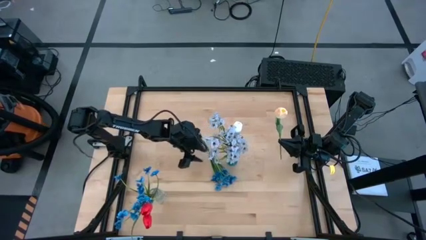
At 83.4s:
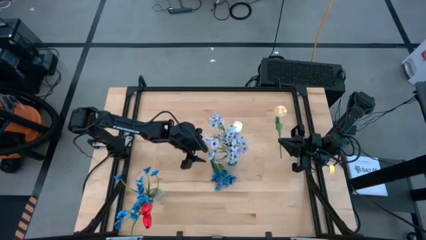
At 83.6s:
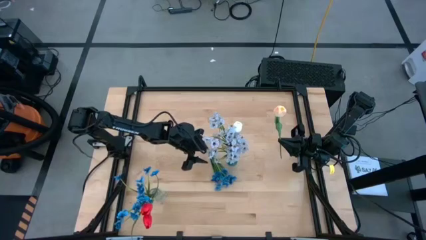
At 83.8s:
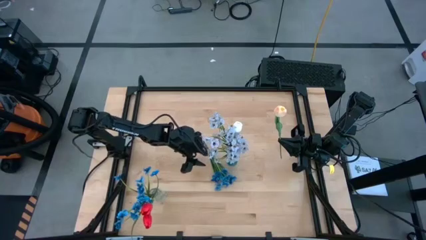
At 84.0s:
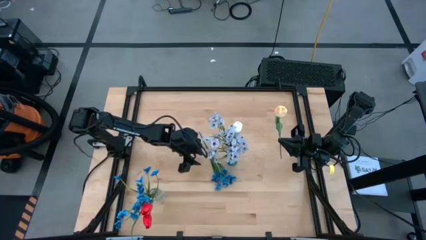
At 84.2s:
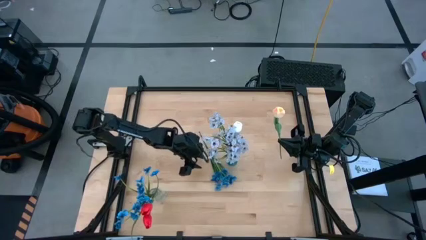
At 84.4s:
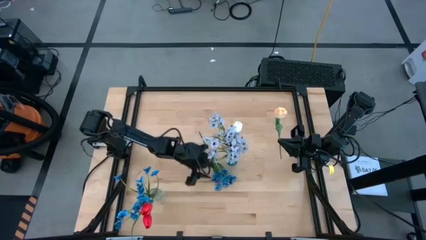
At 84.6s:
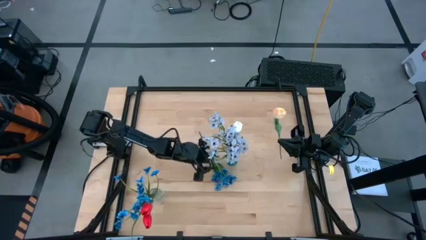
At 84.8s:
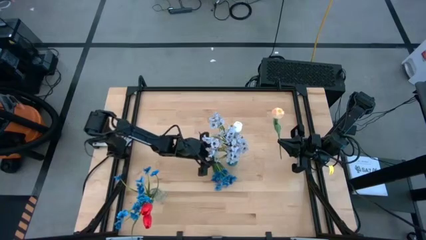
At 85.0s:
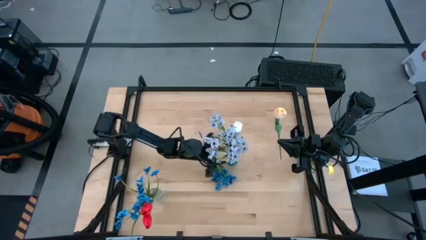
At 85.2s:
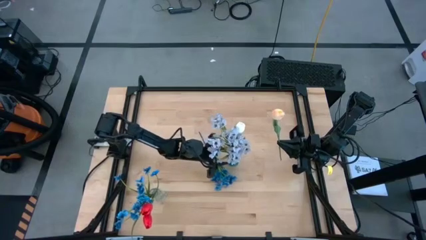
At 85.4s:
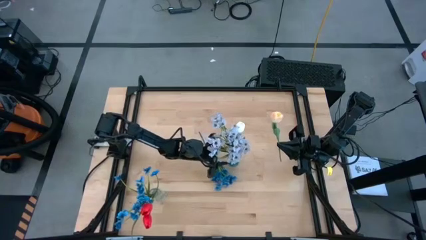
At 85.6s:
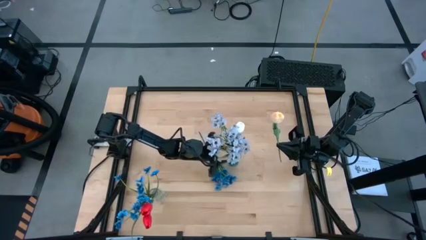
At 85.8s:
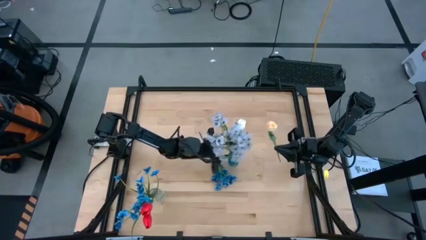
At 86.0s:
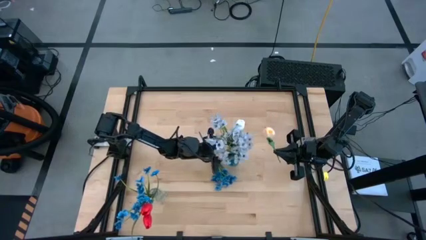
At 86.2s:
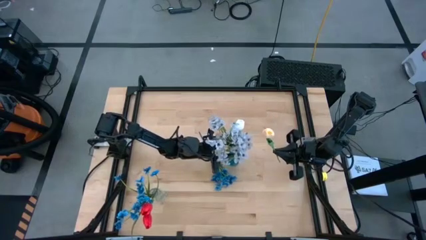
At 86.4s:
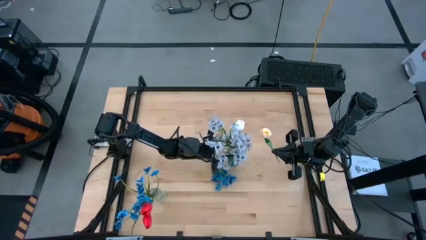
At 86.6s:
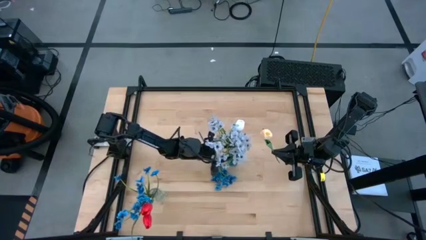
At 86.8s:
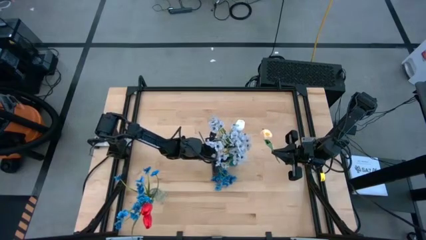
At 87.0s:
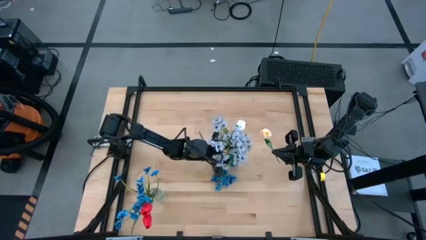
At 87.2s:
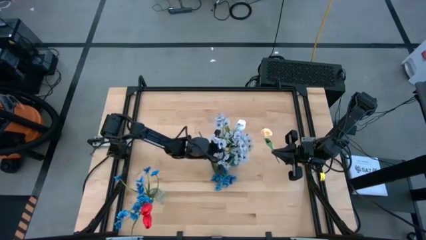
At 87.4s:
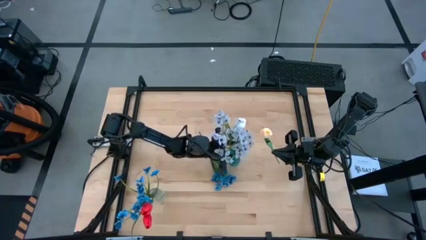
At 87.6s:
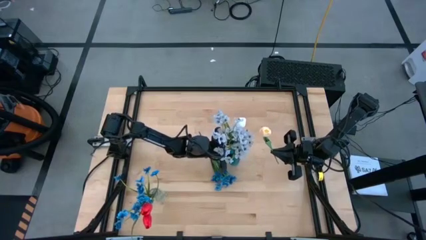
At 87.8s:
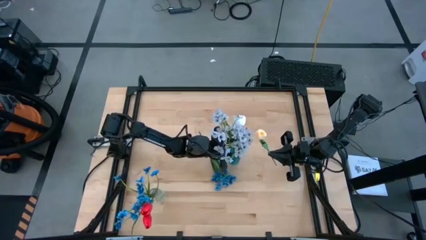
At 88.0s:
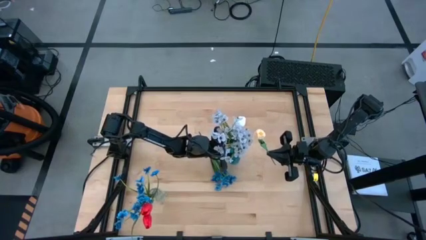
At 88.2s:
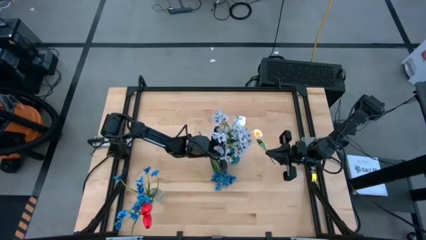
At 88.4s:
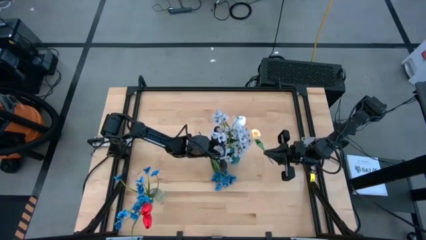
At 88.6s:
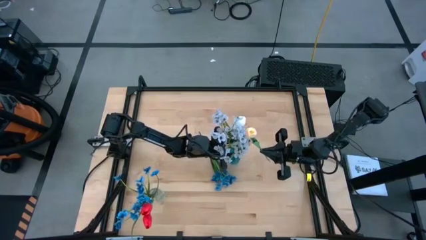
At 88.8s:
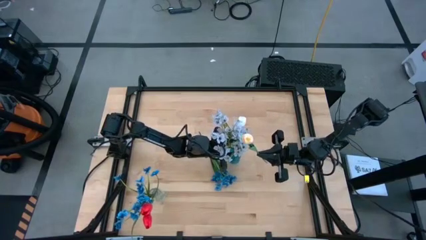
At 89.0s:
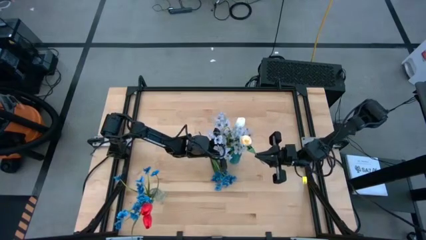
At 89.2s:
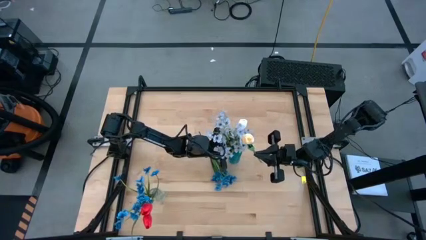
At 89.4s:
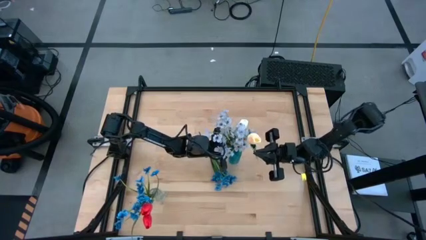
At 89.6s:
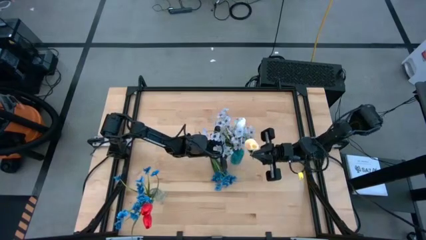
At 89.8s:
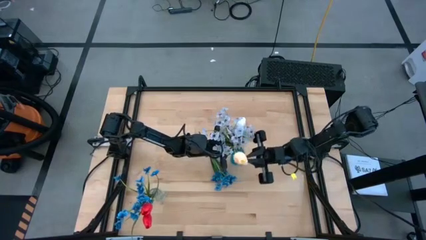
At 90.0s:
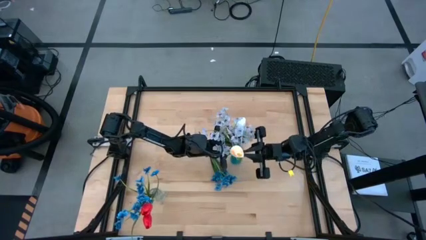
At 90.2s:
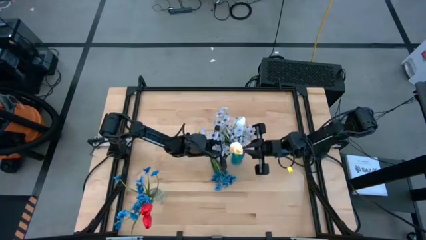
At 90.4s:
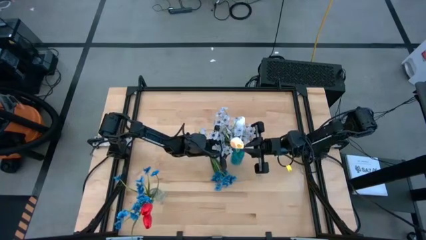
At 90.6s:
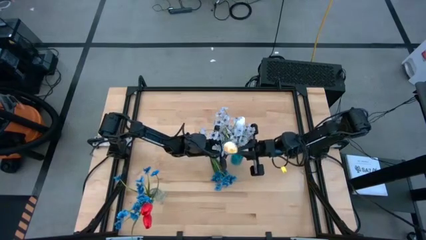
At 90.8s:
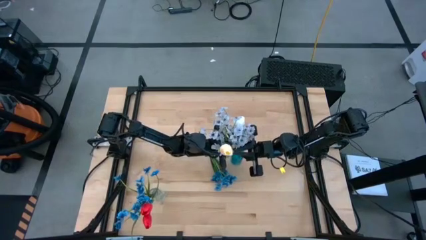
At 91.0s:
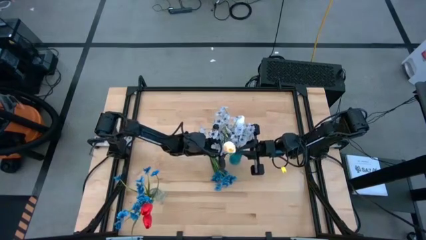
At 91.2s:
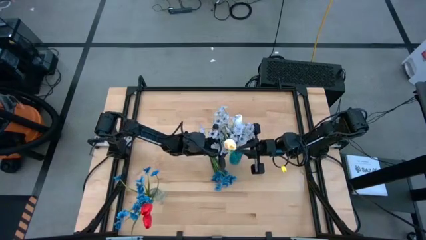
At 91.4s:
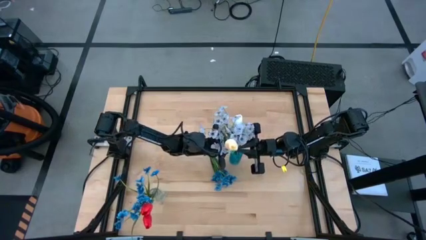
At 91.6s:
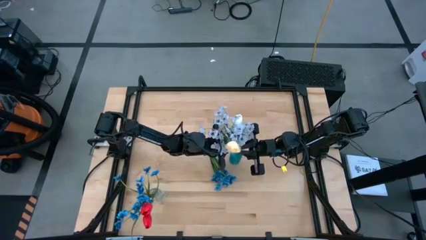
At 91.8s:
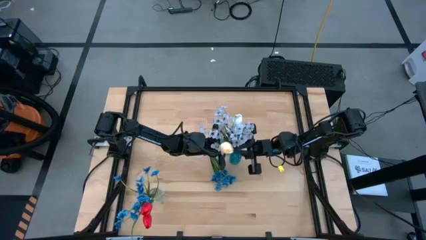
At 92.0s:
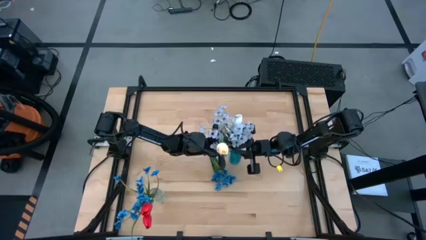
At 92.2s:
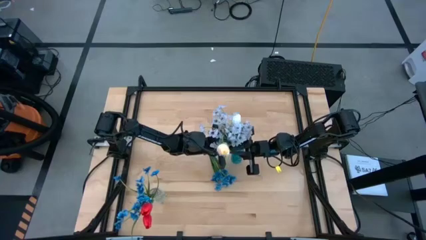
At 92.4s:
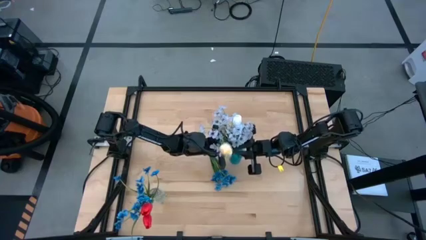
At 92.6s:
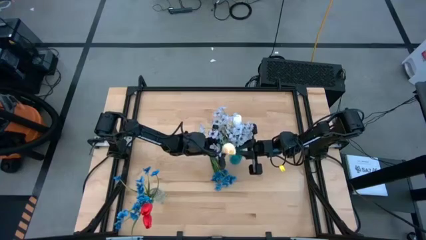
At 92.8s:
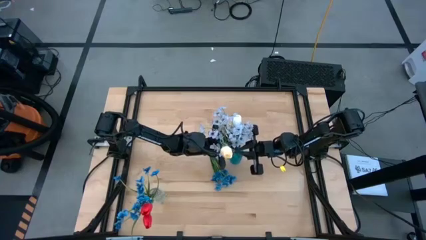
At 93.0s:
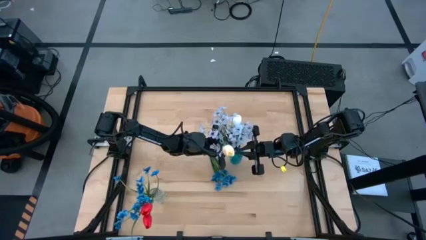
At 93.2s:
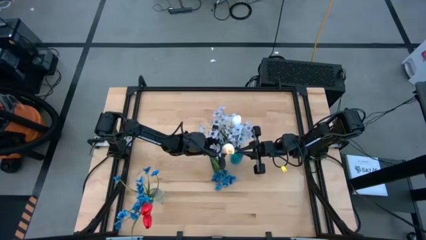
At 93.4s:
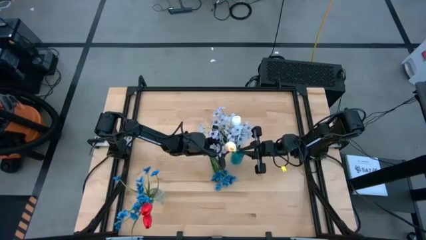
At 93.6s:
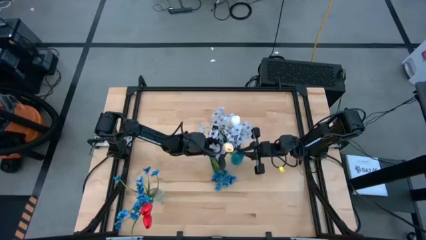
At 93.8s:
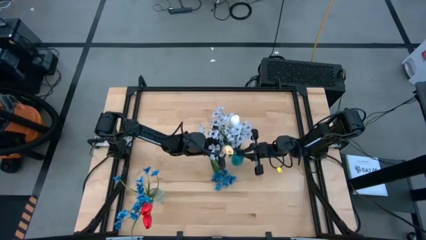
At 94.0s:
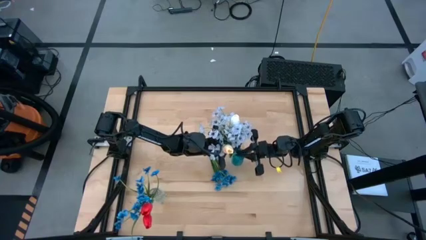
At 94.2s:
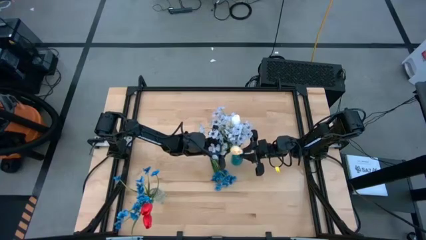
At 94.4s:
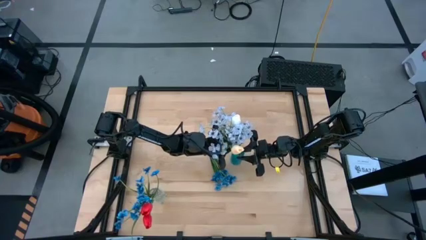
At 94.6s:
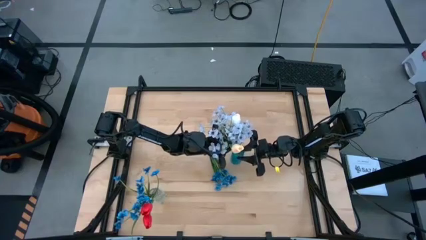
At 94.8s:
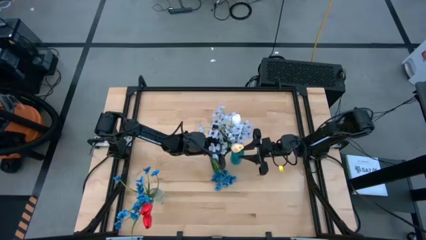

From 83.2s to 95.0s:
Task: Sort flowers into vase by color
Put the pink flower into the blue flower vase

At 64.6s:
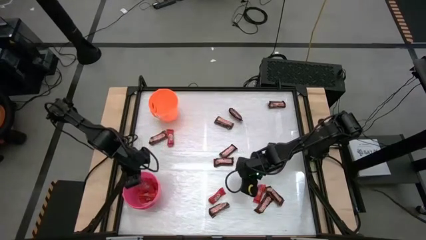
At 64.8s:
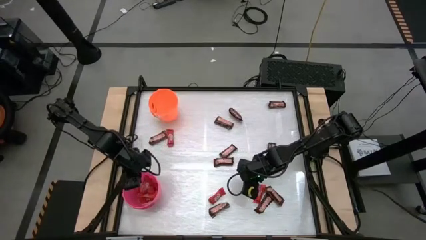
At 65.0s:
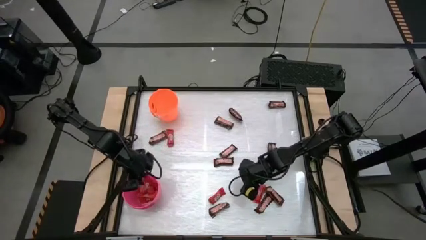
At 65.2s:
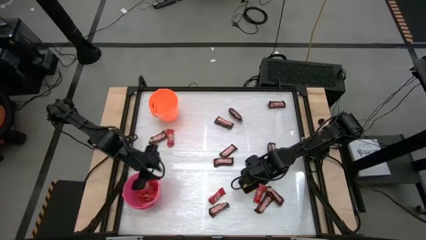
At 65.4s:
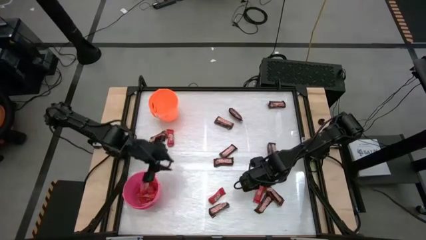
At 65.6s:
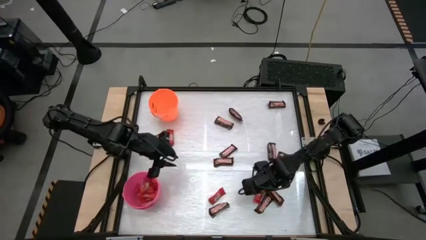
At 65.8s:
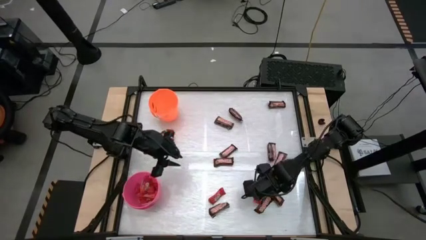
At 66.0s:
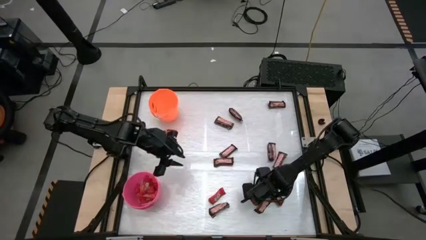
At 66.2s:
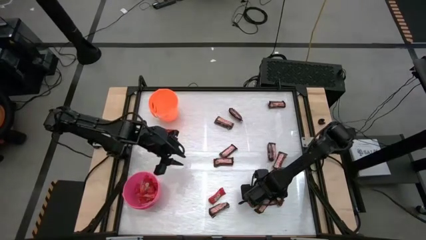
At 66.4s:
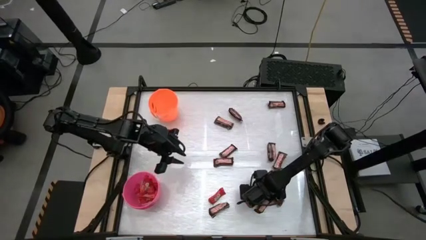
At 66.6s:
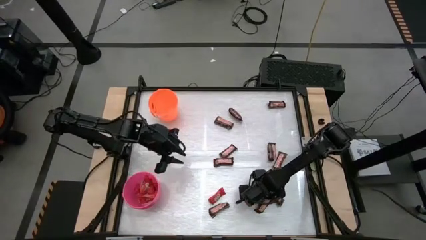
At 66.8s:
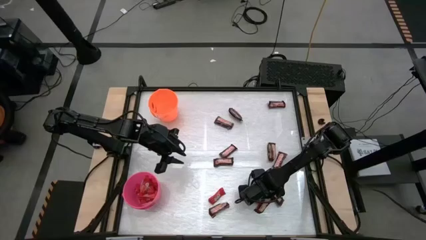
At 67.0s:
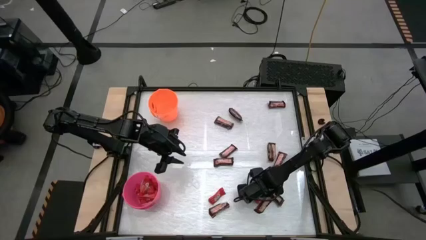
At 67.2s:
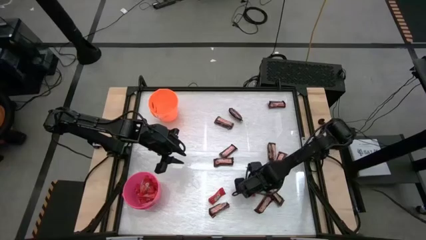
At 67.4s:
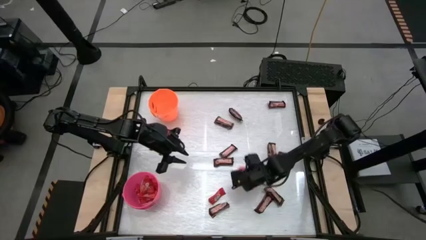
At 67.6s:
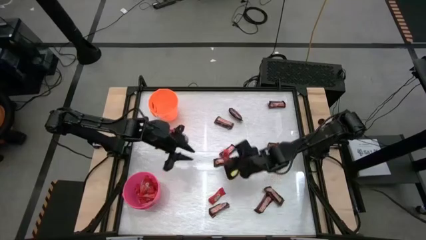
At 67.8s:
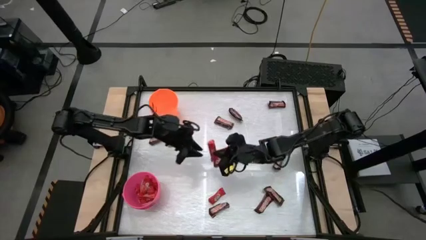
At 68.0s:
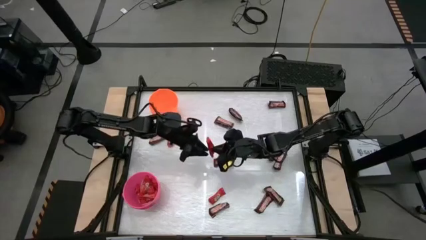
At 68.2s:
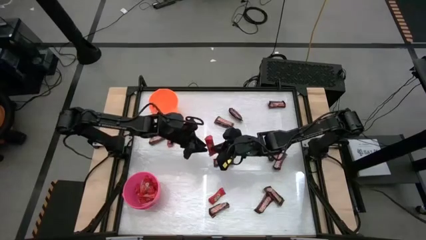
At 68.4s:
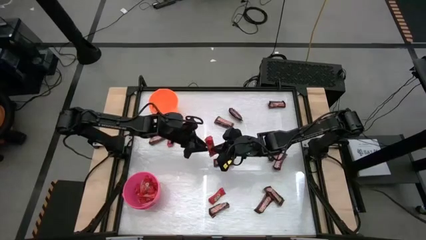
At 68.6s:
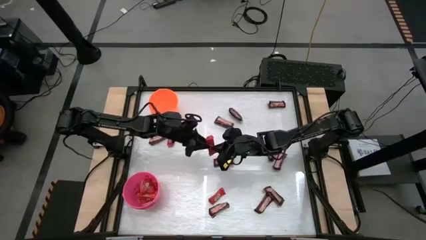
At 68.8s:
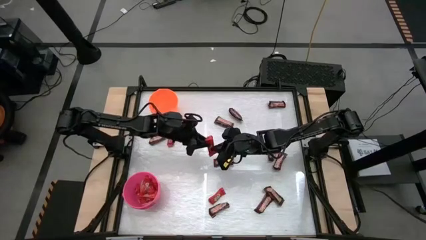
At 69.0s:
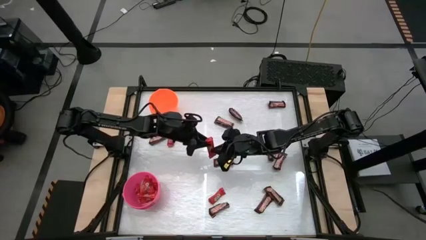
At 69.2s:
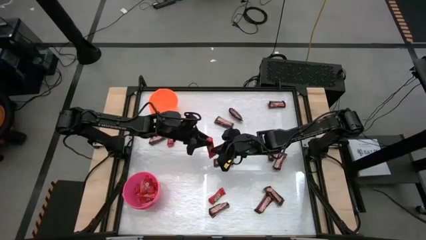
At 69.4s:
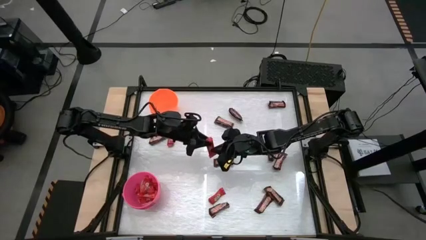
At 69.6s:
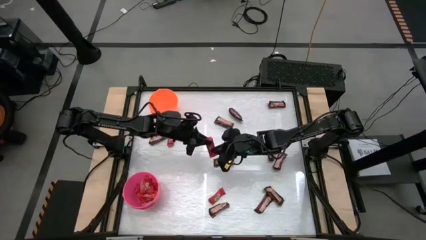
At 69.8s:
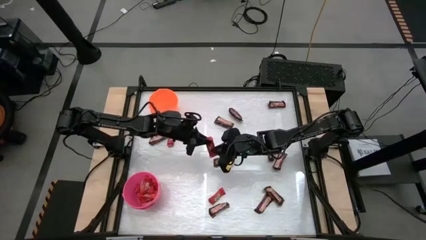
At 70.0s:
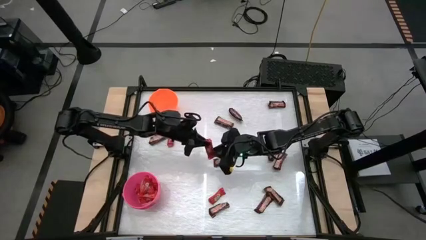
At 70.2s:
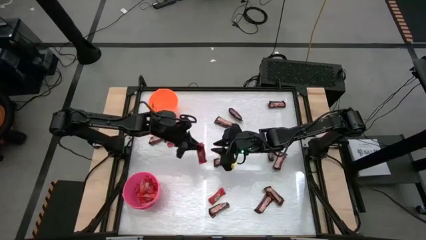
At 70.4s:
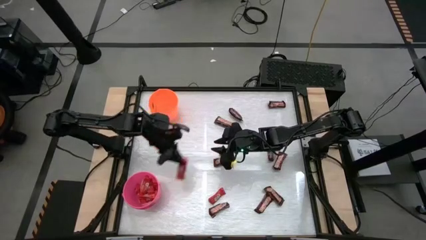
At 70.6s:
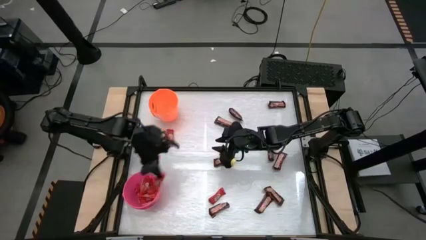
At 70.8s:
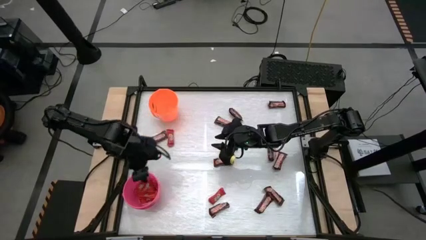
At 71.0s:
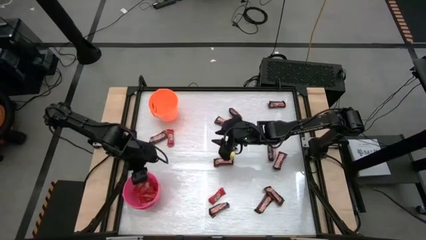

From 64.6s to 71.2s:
Task: Sort candy by brand, put in halloween buckets
Put the red chocolate bar into the pink bucket
